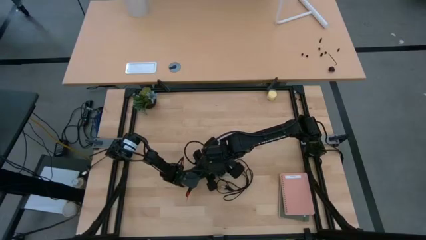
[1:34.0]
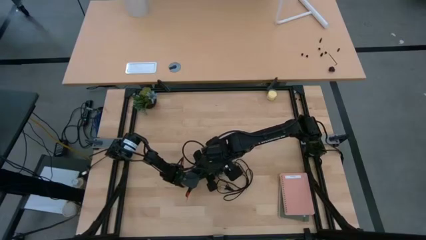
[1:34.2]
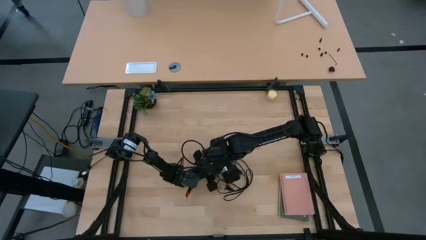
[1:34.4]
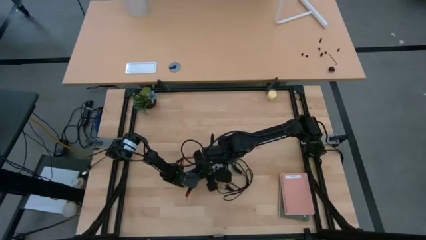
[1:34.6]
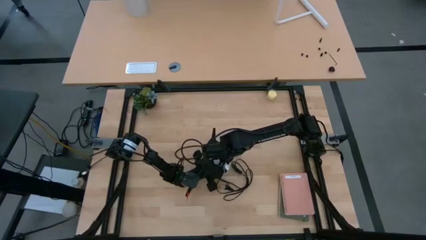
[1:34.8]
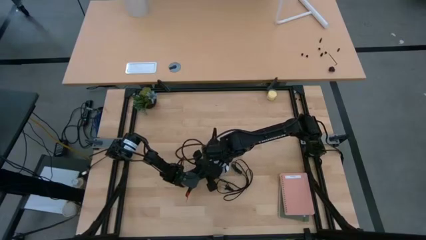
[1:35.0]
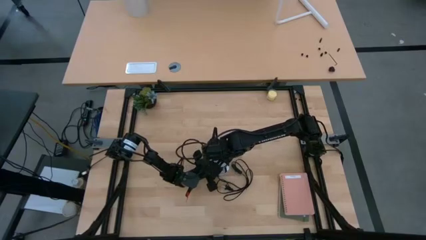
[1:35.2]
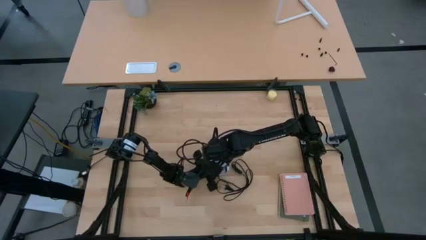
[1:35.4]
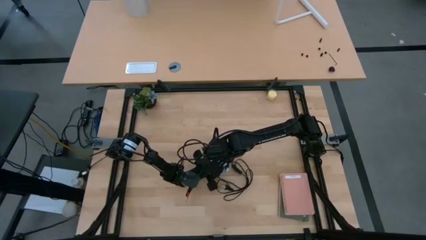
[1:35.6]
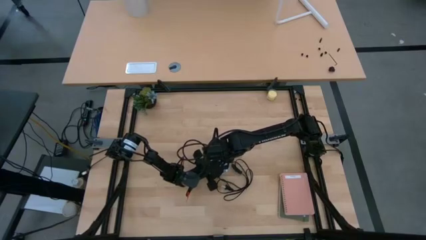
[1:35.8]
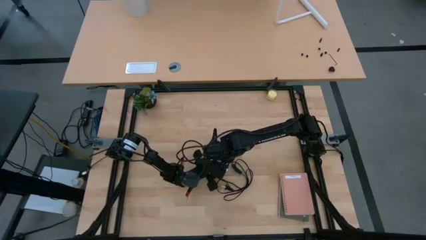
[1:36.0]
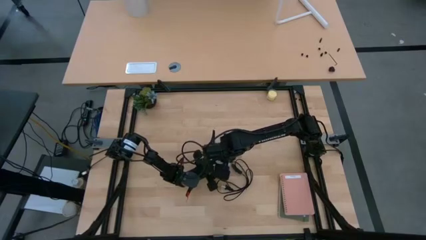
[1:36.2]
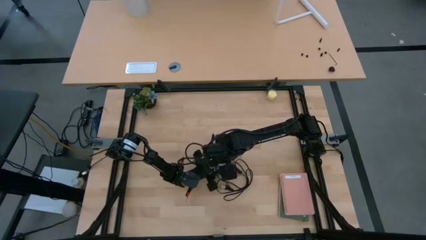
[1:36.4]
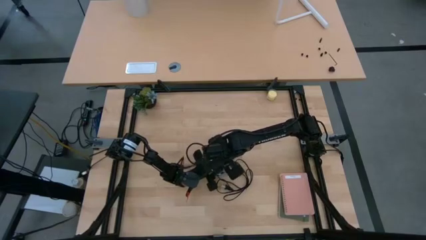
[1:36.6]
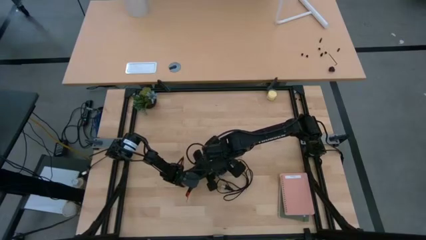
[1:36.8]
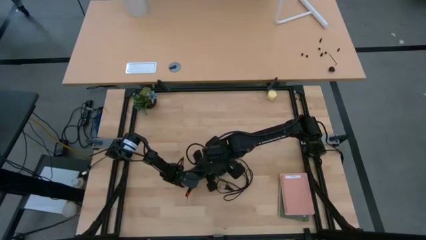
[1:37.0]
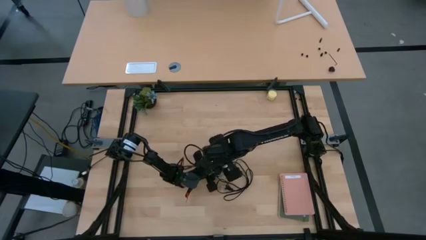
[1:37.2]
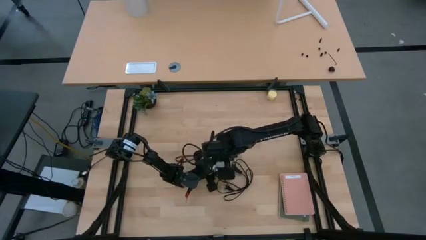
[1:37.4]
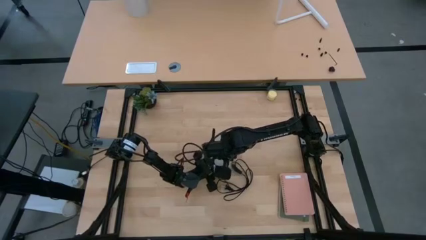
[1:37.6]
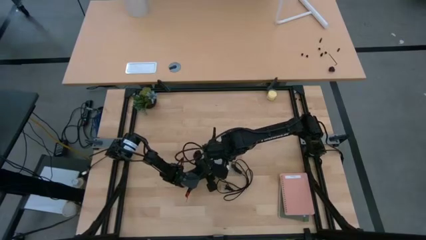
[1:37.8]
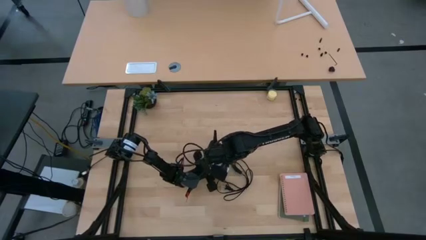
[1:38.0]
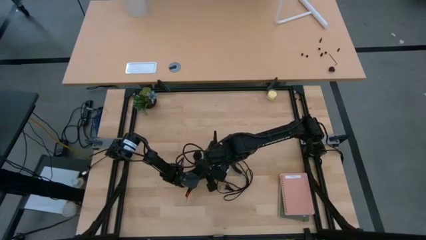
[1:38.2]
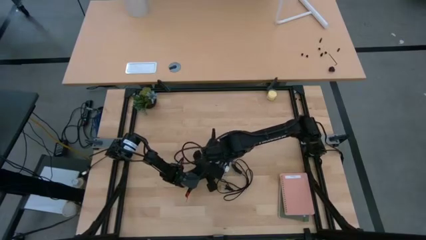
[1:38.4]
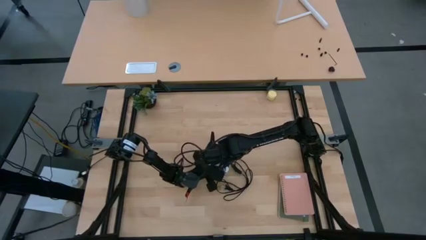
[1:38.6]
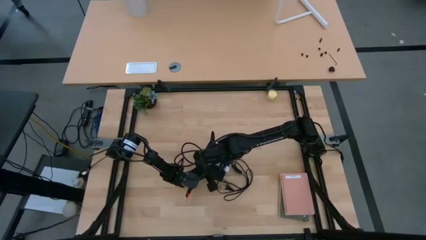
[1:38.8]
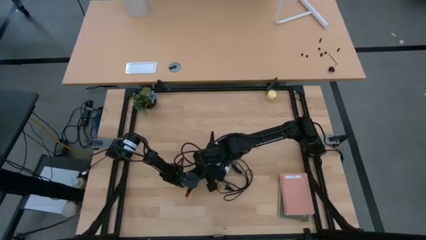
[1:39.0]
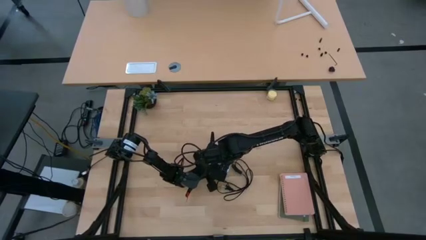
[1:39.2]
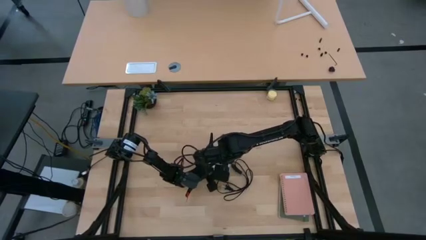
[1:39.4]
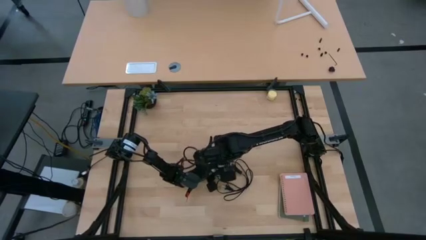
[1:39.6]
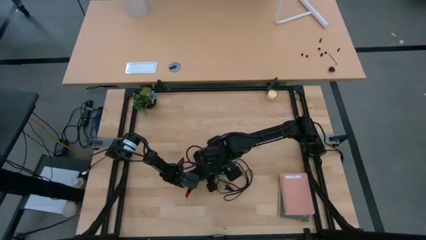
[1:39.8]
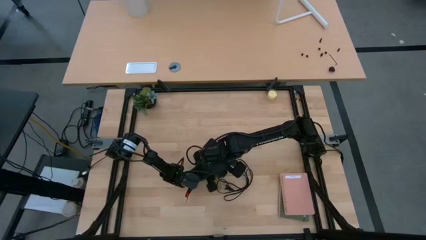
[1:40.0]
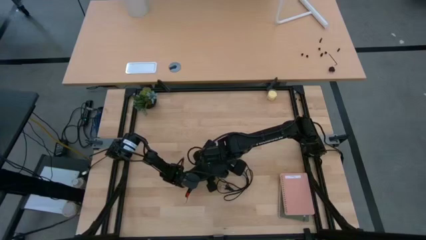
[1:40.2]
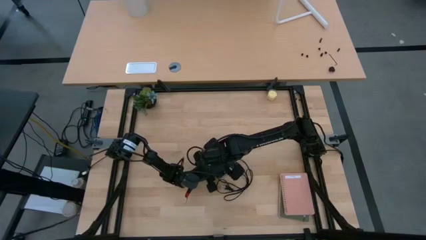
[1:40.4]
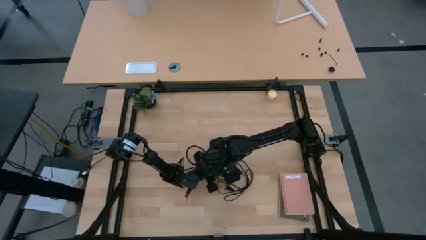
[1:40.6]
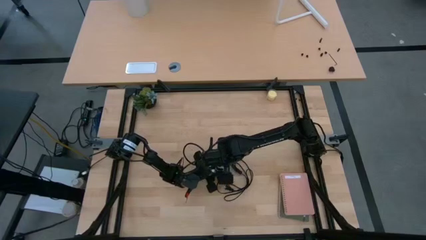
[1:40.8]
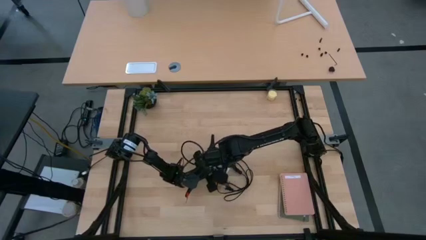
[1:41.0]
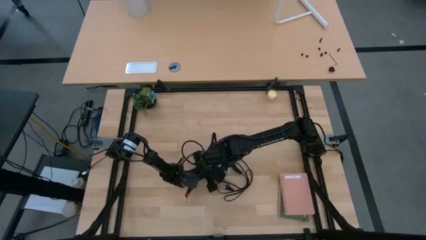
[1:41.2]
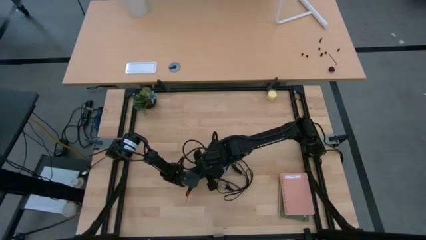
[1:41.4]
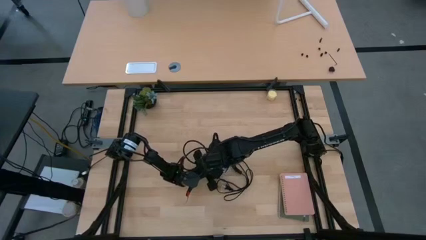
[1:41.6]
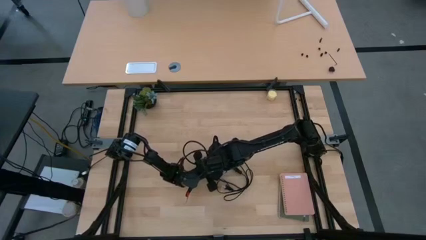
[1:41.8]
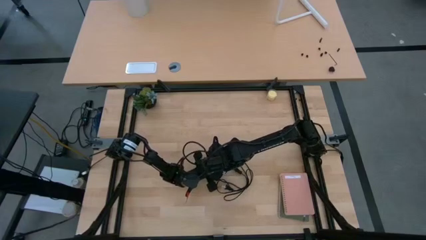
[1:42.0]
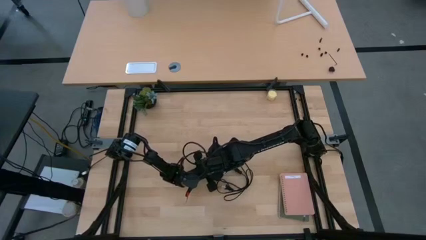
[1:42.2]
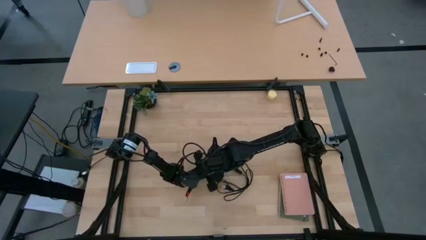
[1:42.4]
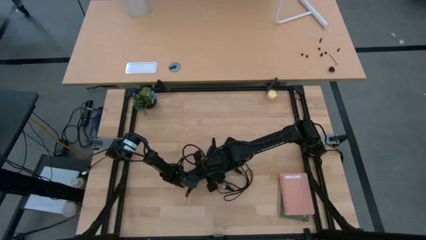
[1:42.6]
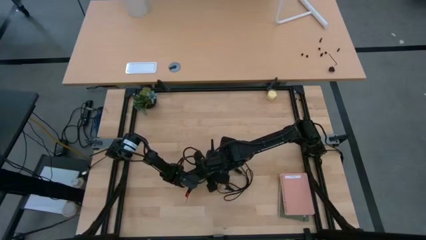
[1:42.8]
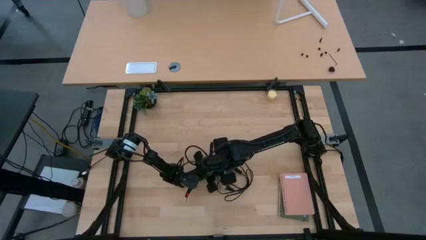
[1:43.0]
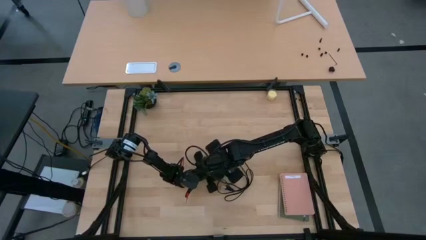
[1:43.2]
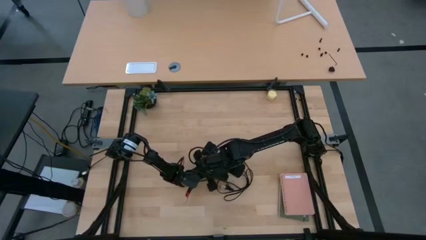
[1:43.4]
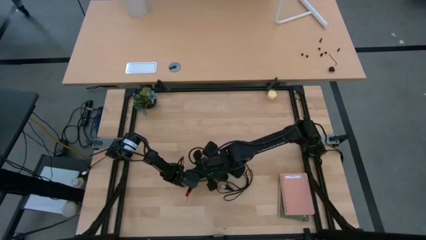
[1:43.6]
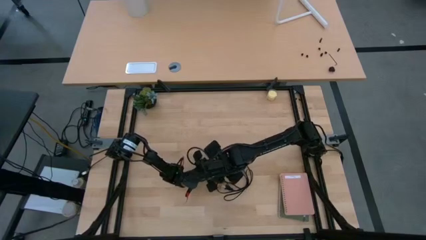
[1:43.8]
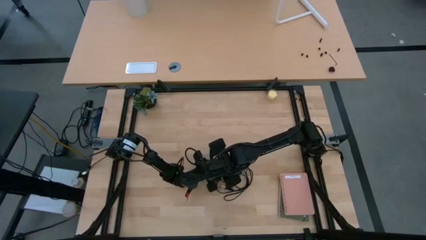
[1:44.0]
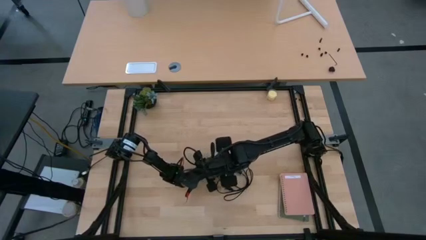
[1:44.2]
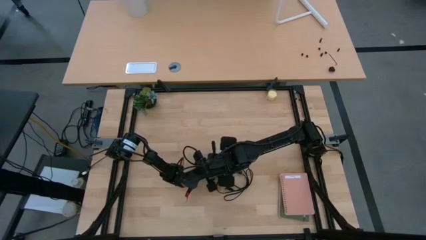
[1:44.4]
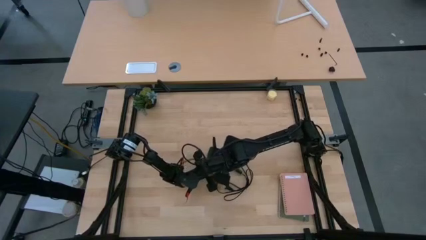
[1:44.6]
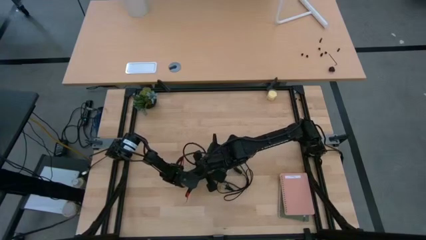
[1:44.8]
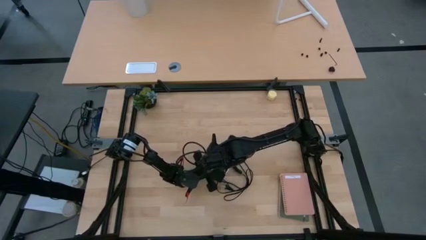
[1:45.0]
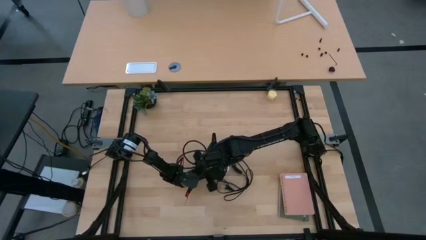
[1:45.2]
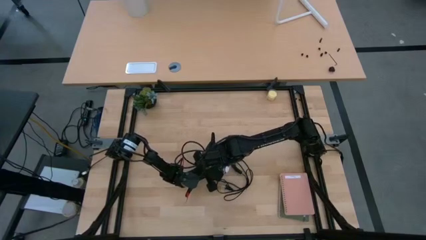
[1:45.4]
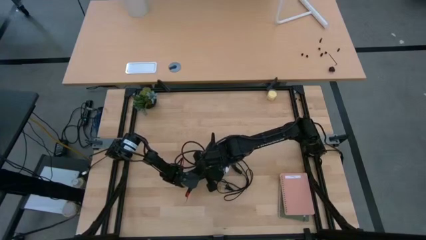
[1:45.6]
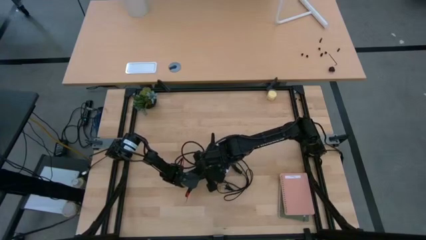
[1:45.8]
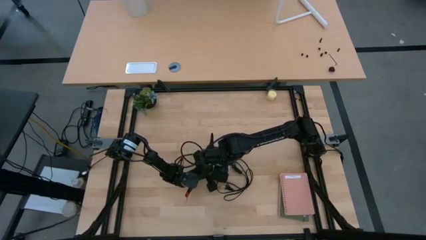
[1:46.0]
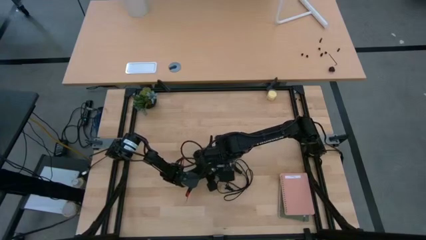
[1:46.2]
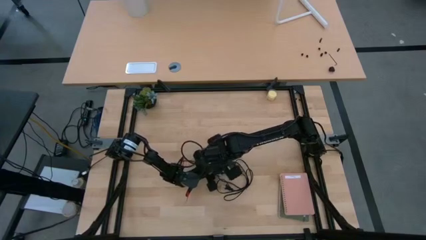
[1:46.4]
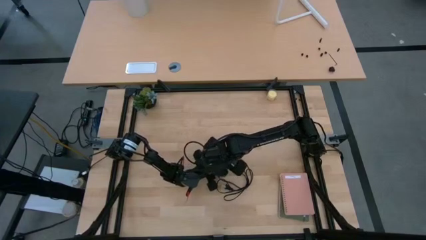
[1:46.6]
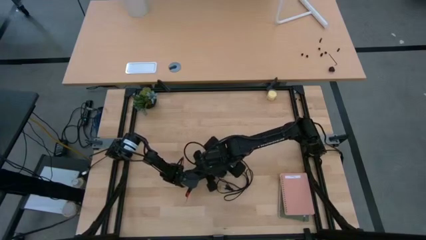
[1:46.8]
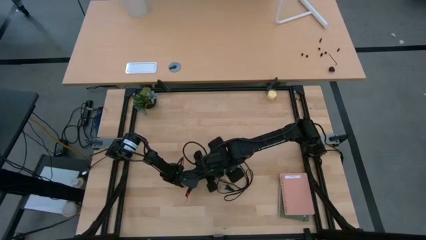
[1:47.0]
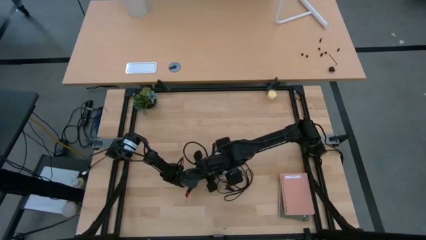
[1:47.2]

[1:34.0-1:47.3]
Task: Screw lightbulb
Remove the white lightbulb from the silver lamp
